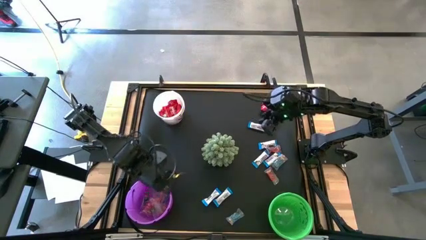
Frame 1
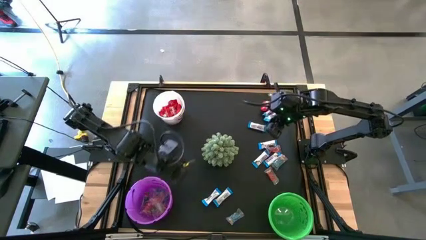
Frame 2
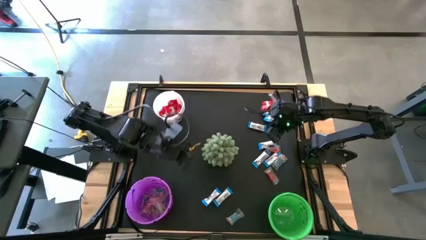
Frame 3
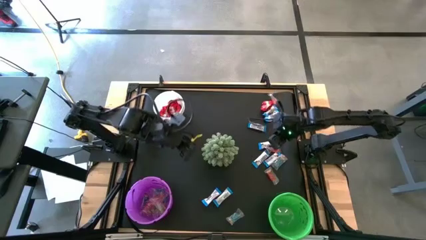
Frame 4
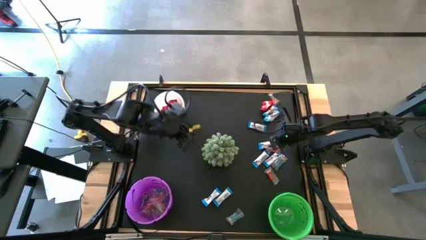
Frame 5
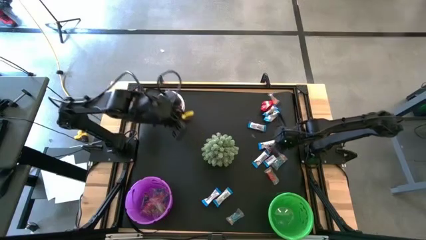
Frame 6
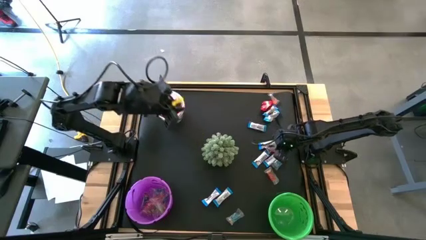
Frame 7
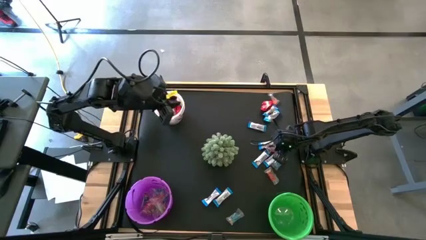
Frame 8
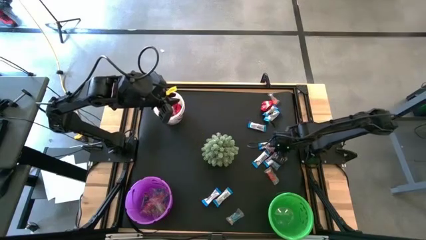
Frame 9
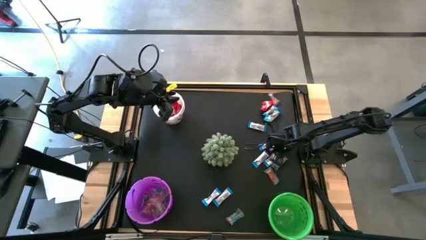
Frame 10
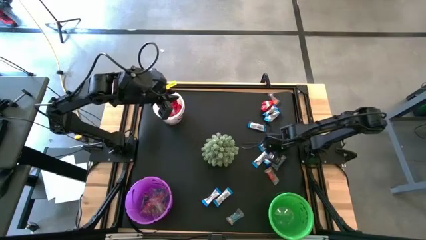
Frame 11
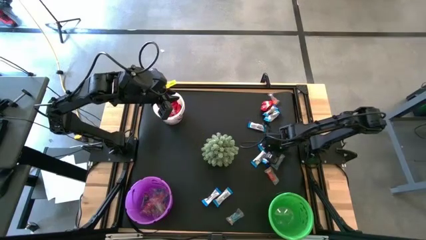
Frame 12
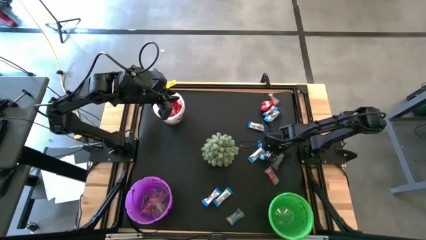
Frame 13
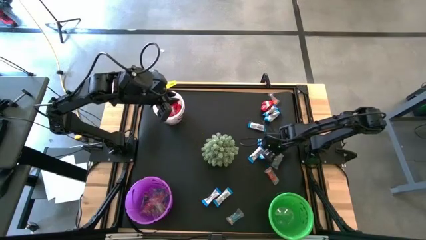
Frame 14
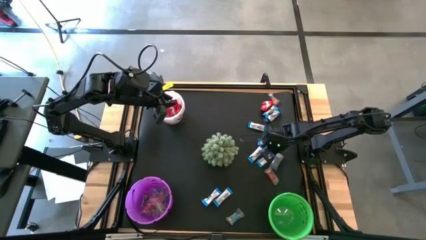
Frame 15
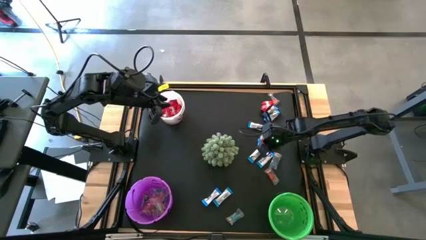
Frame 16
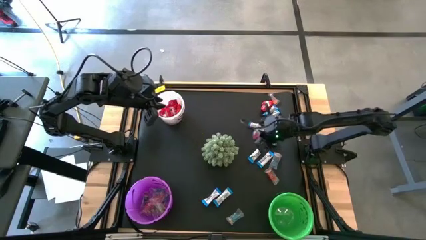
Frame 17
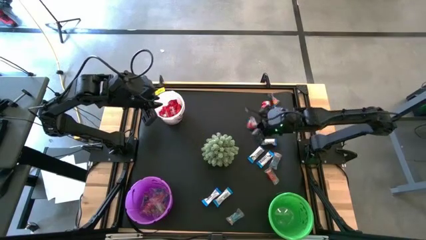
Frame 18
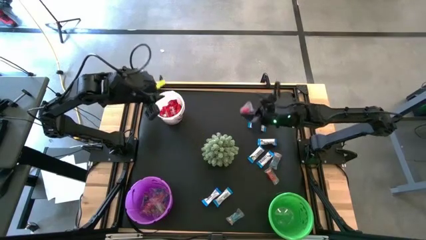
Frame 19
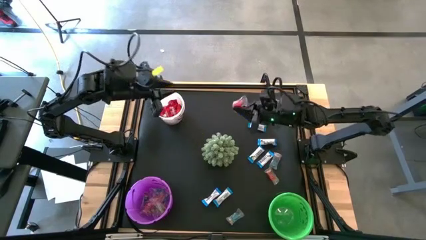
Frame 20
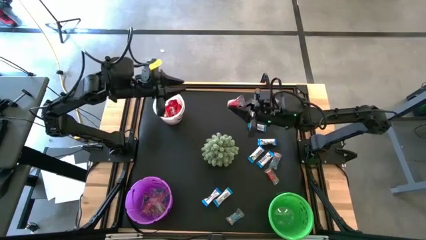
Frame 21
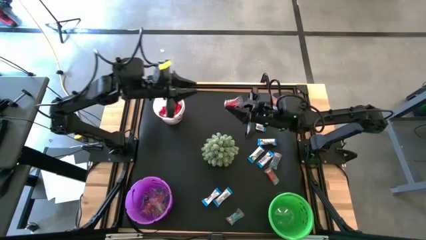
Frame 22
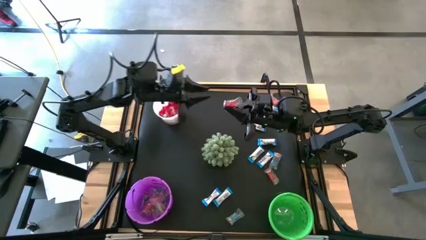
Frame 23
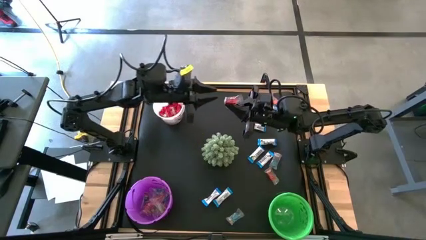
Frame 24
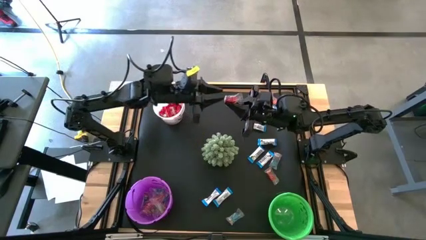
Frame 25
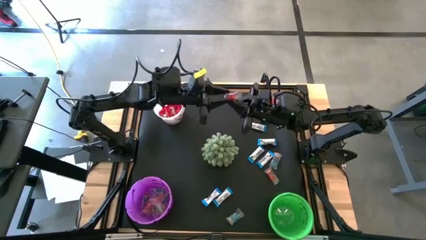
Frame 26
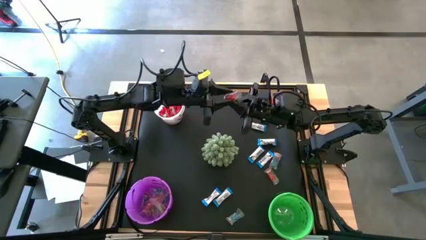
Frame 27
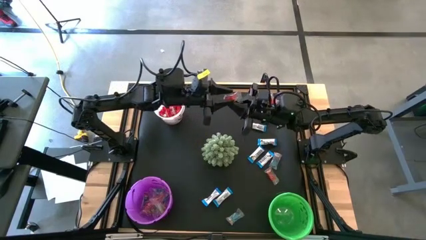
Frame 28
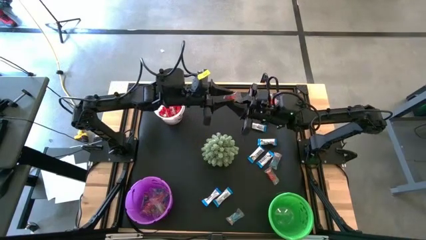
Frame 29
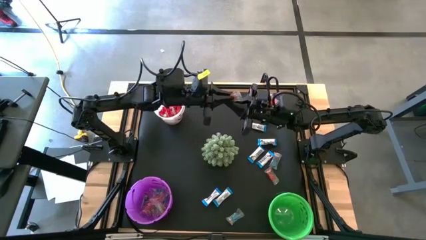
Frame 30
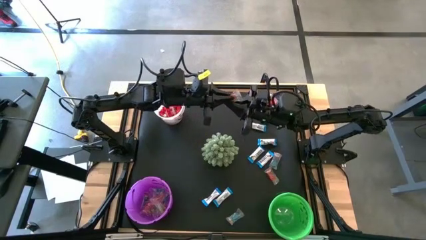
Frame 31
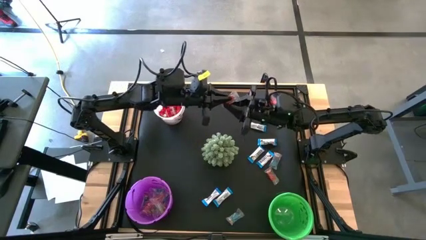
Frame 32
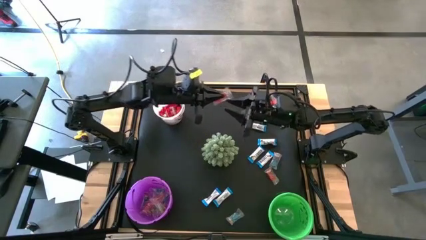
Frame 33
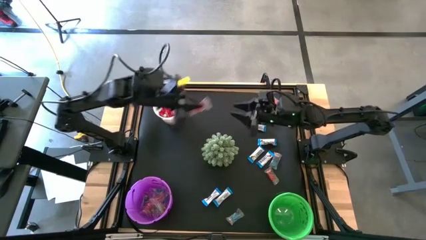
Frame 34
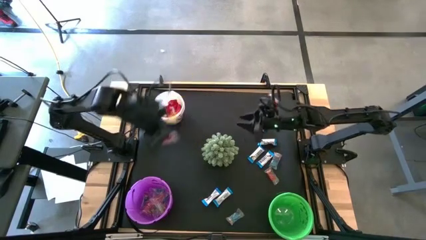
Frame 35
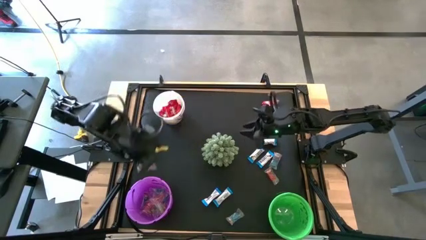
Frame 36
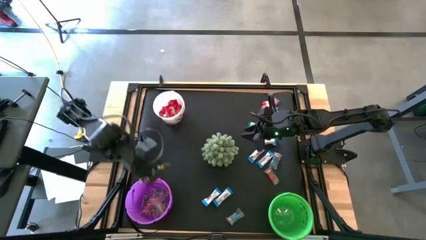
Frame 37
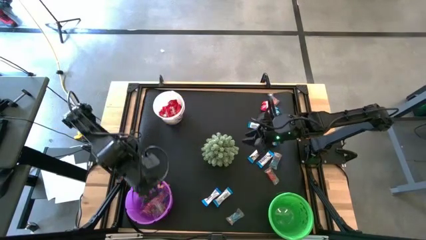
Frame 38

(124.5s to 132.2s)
Task: Organize candy in baskets
Put the red gummy into the purple bucket

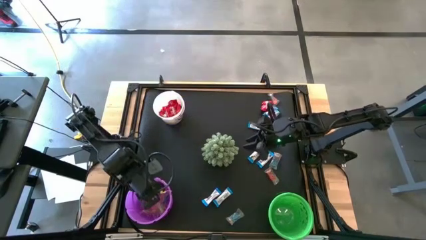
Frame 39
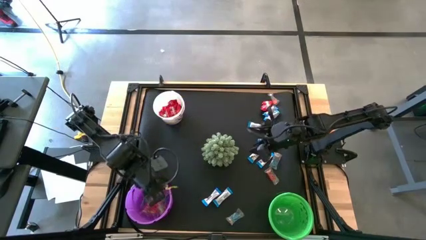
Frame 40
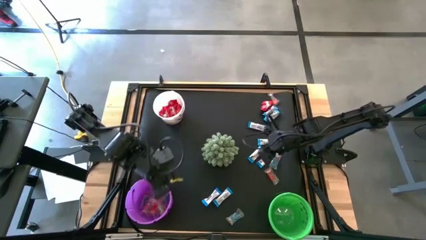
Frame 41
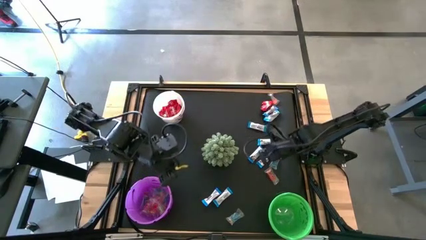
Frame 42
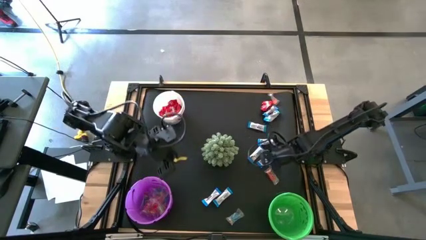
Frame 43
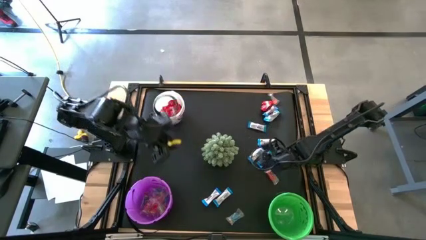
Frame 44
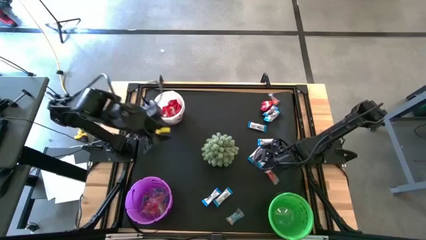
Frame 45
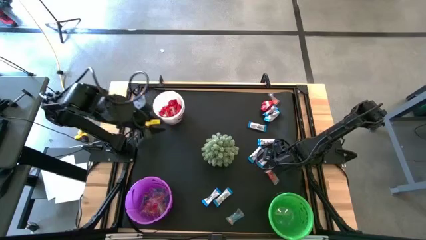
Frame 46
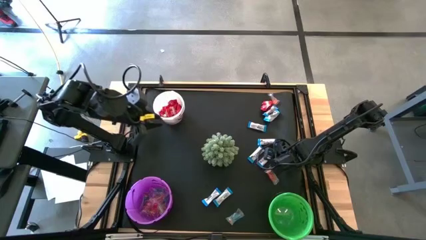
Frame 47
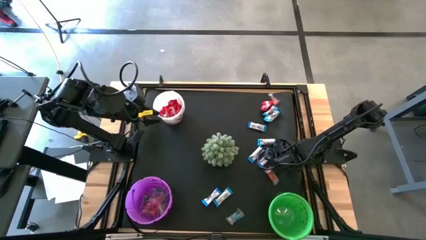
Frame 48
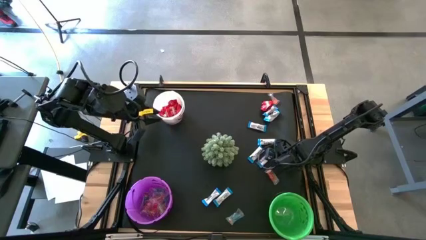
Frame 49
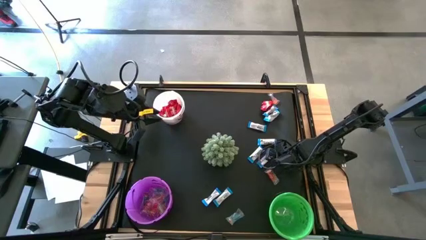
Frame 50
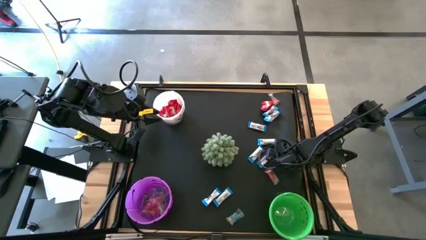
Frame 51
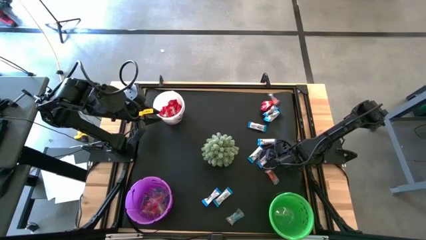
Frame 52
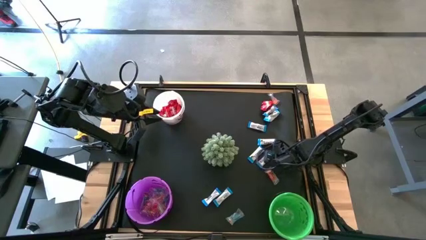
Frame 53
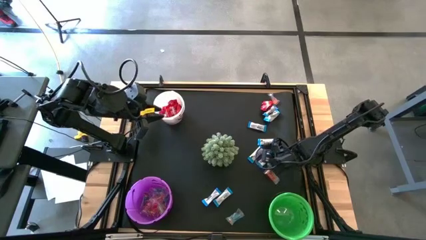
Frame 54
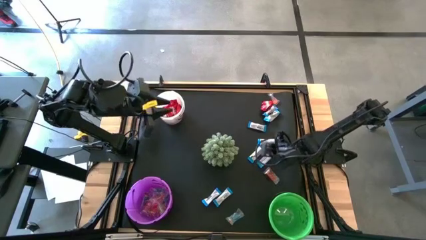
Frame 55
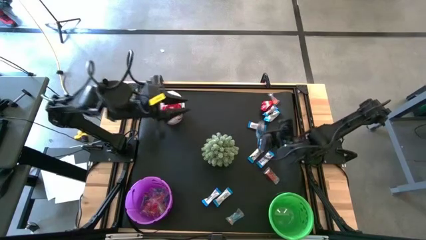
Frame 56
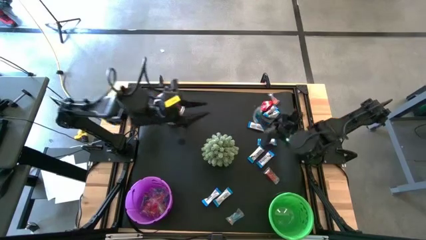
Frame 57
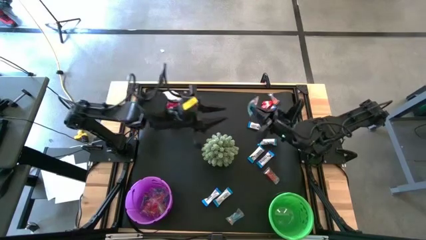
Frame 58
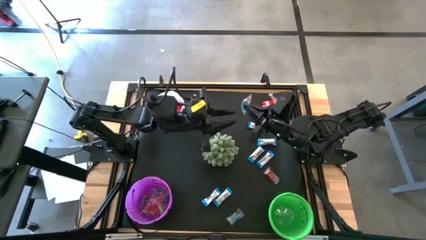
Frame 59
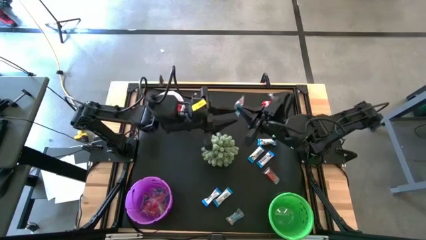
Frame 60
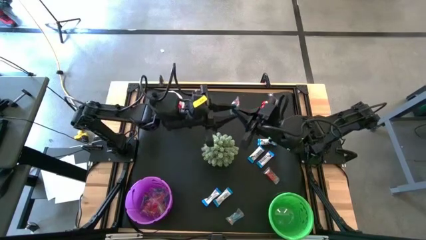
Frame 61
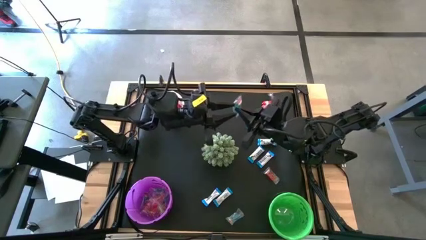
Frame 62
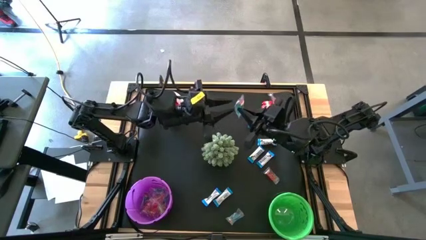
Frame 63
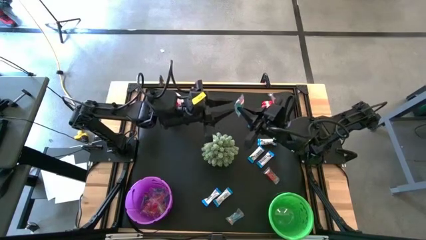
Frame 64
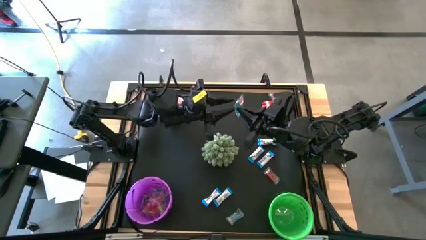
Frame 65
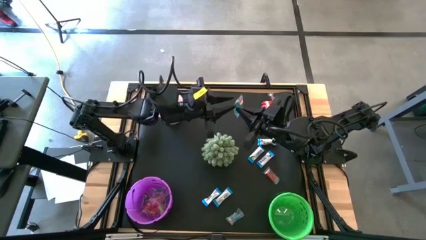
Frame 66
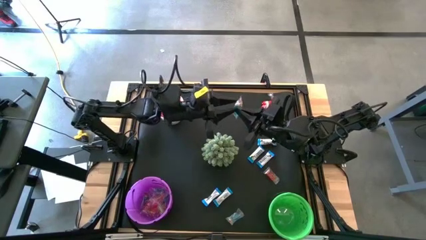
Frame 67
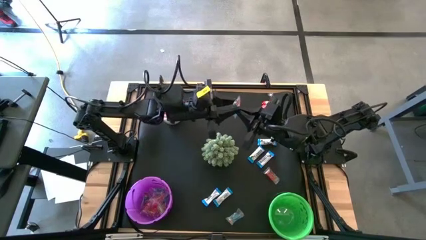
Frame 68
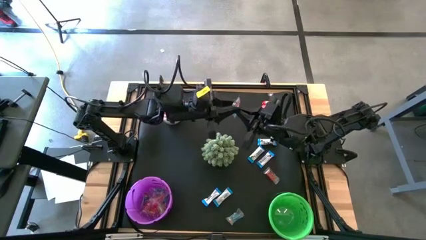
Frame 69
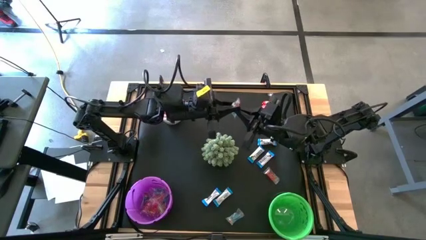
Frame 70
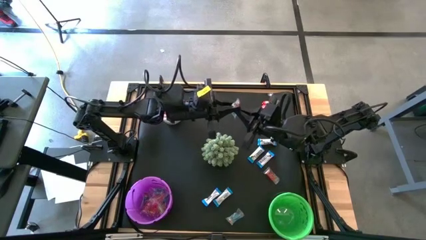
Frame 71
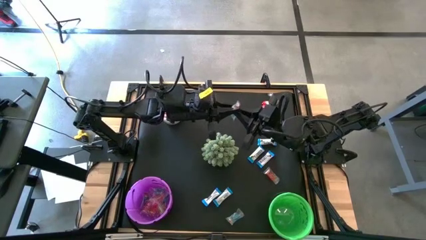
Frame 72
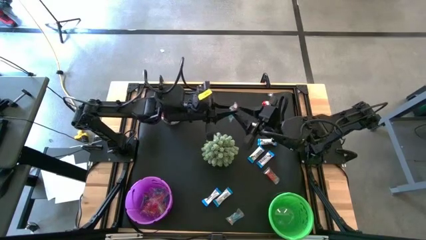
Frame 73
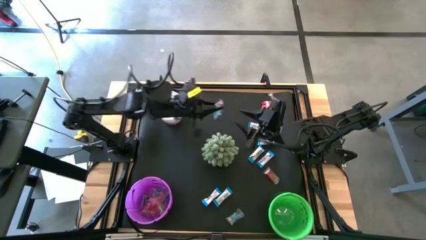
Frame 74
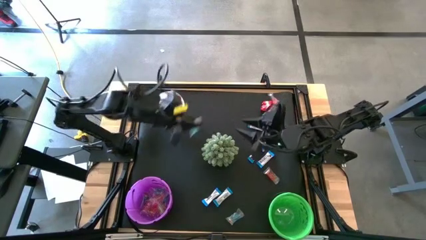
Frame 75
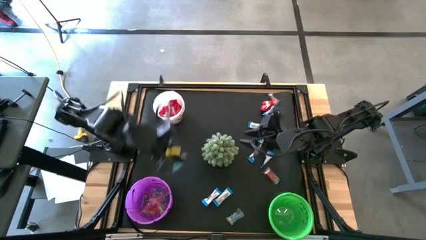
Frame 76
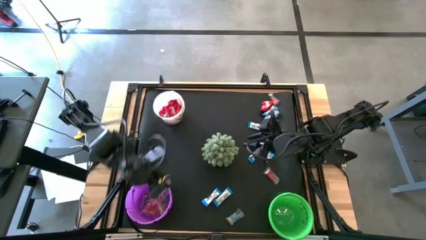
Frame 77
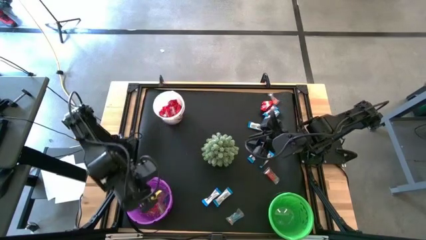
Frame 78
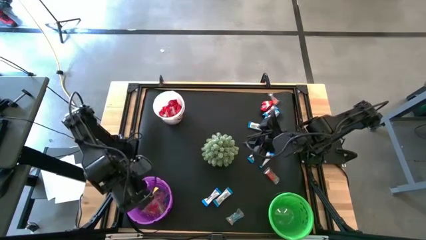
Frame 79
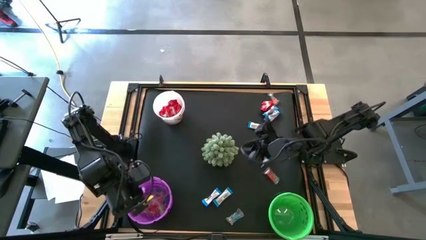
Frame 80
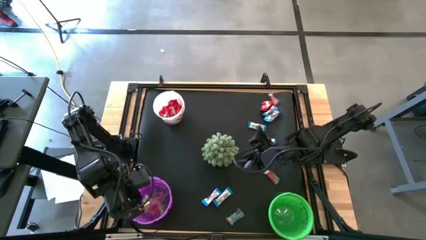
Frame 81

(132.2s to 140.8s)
Put the blue gummy into the purple bucket
